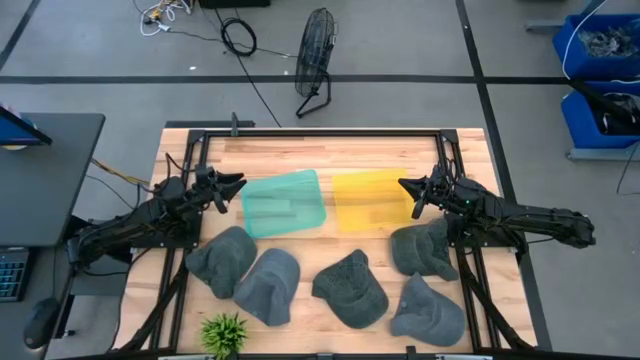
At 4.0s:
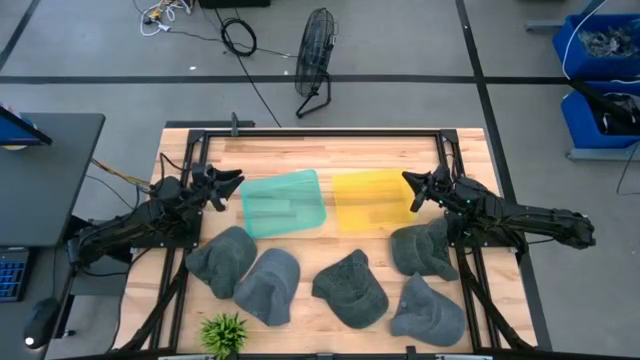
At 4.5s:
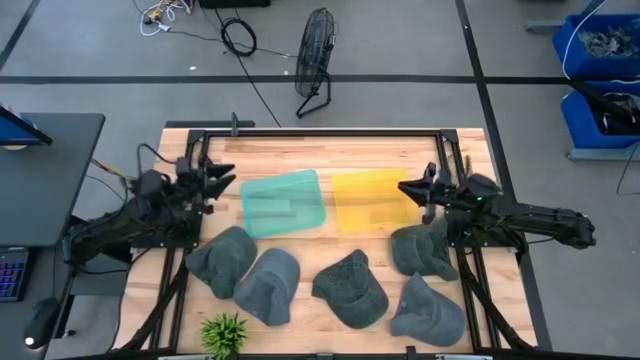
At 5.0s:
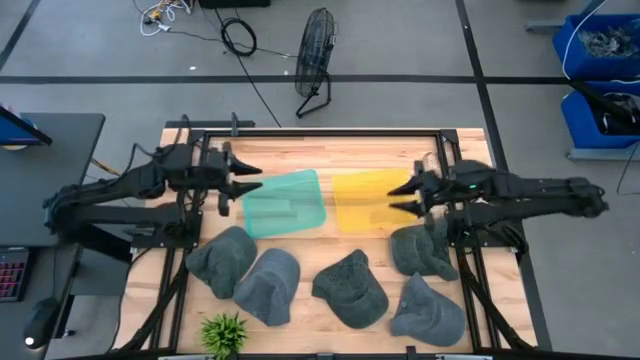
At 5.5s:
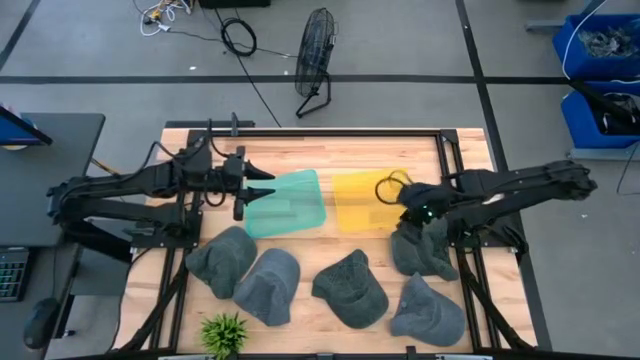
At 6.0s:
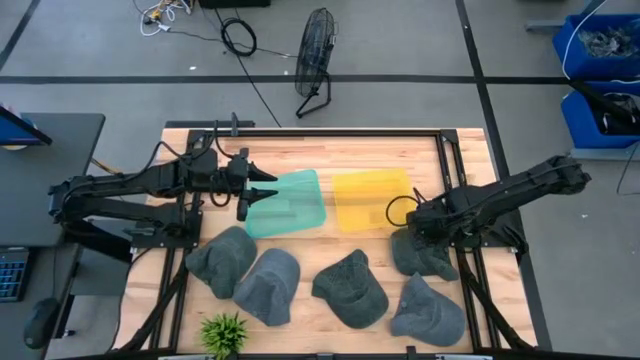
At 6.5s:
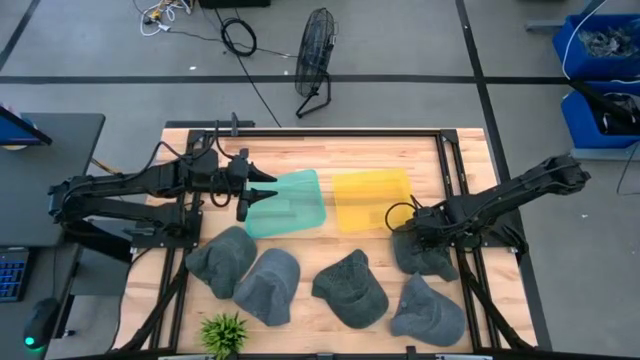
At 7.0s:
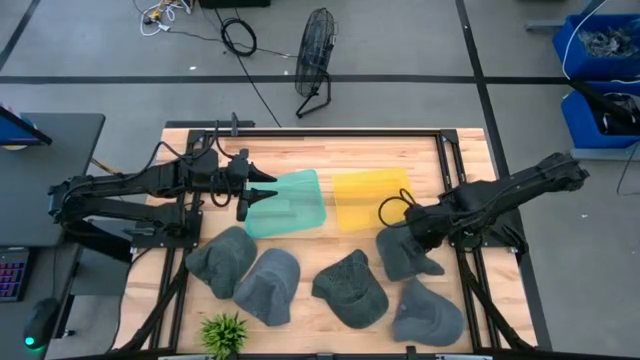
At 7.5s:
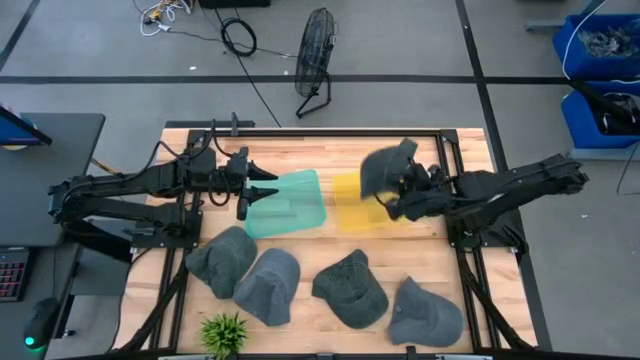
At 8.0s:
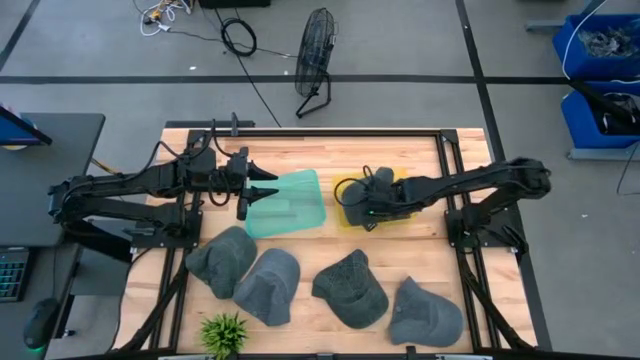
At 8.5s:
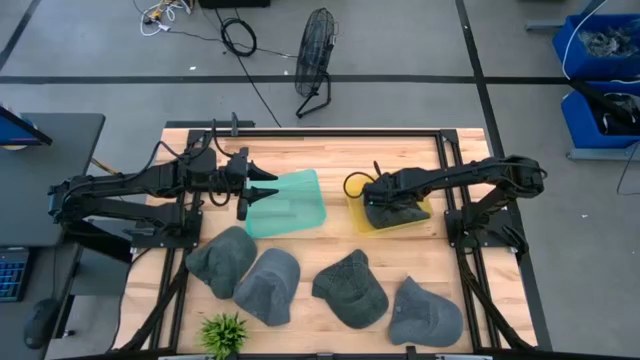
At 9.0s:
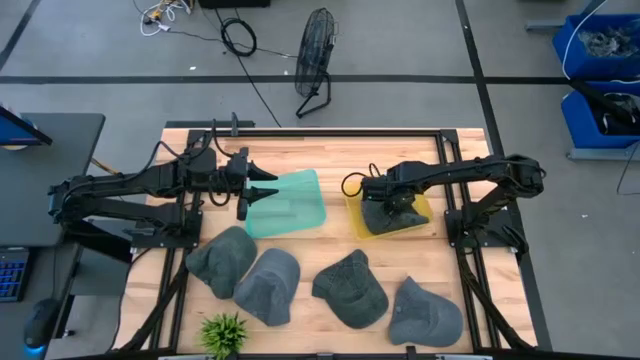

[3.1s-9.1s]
Task: Pick & Place hat
Put the right black cap into the yellow bin

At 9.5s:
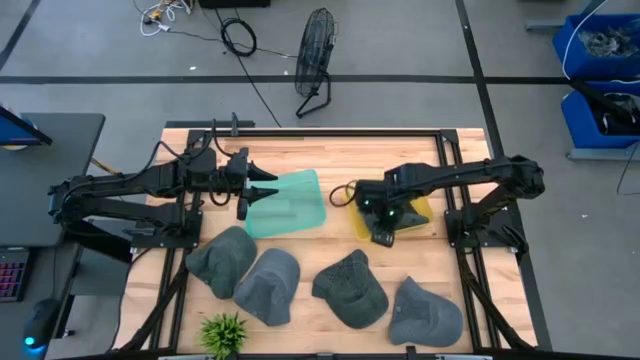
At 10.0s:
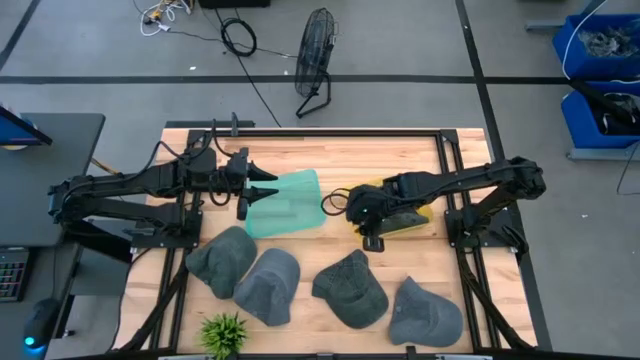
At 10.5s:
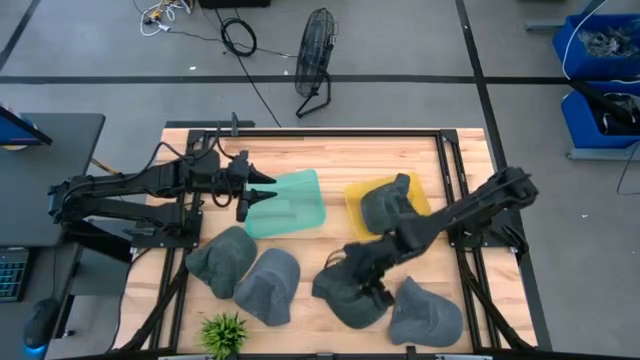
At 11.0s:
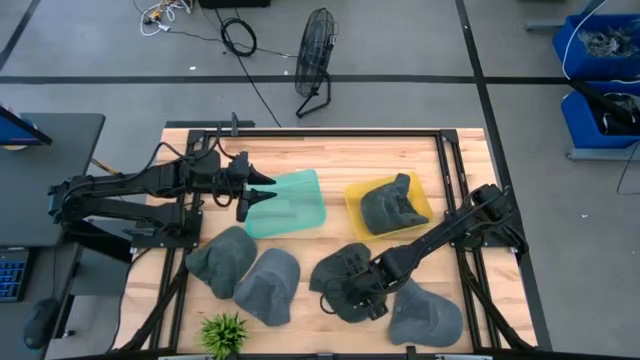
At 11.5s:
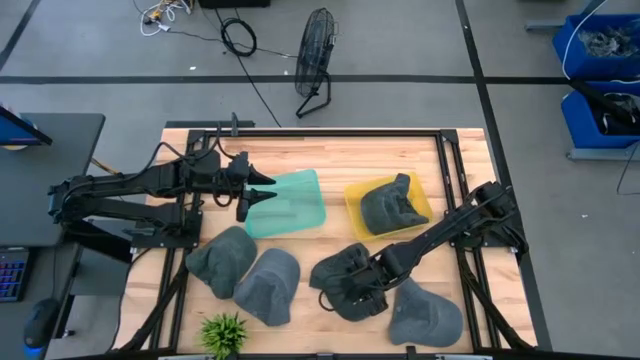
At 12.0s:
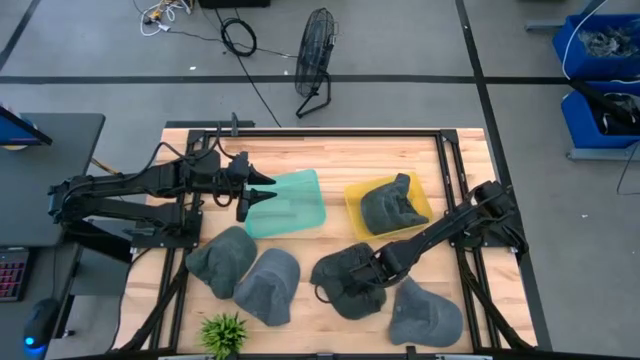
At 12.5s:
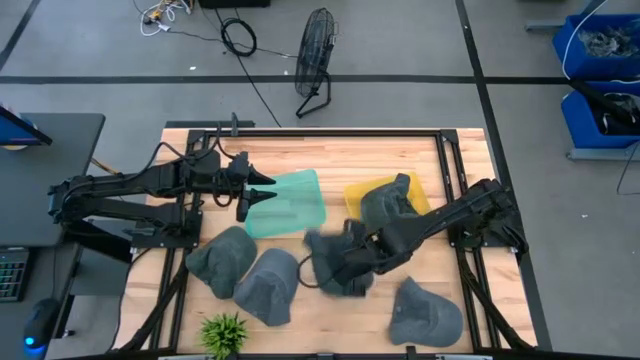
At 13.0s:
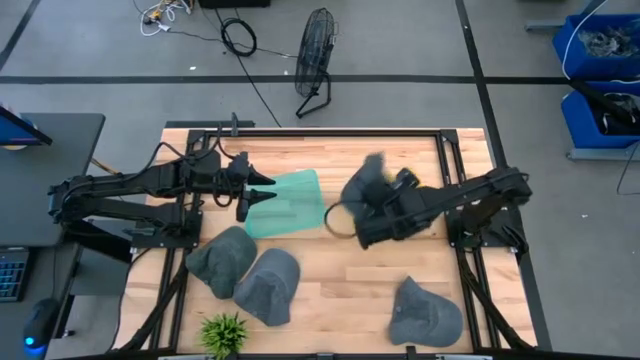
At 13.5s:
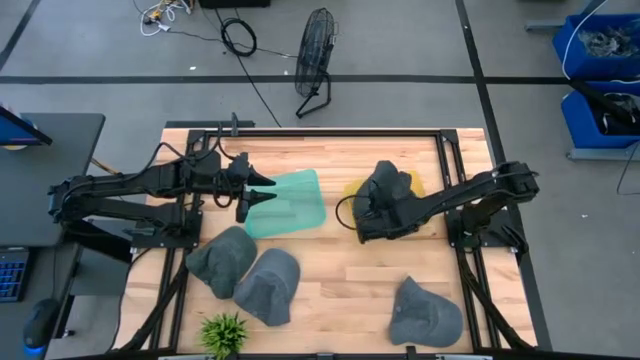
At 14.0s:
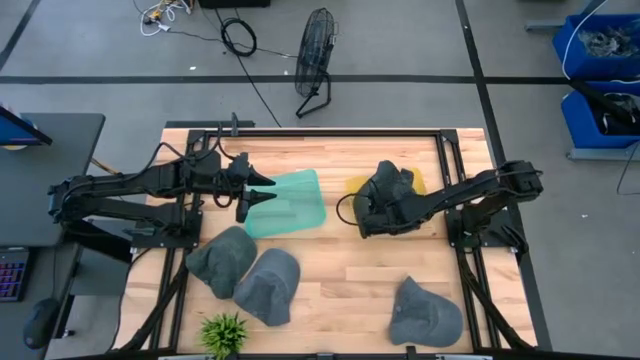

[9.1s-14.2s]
Put the right black cap into the yellow bin

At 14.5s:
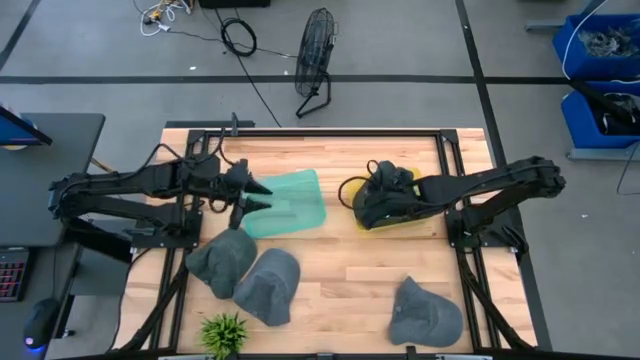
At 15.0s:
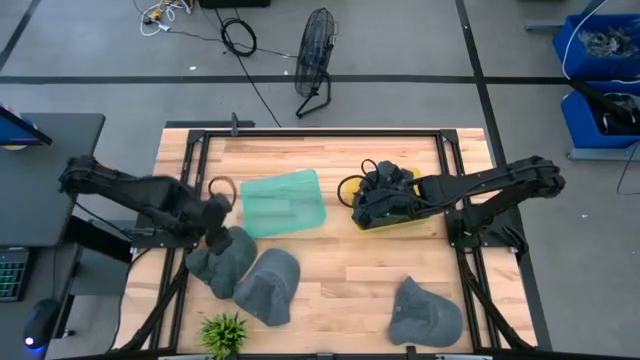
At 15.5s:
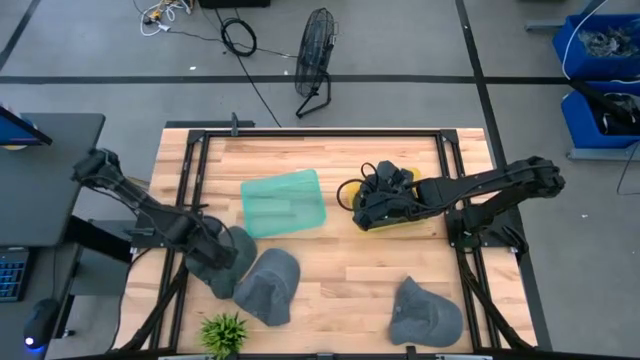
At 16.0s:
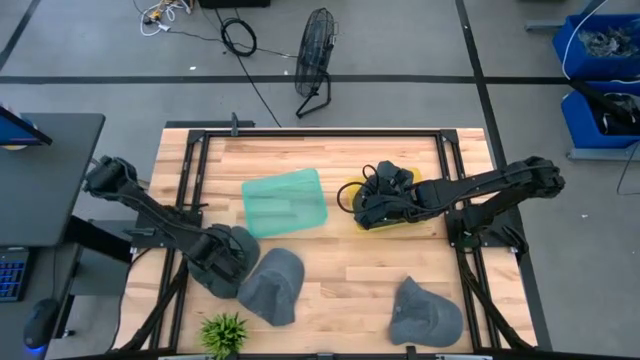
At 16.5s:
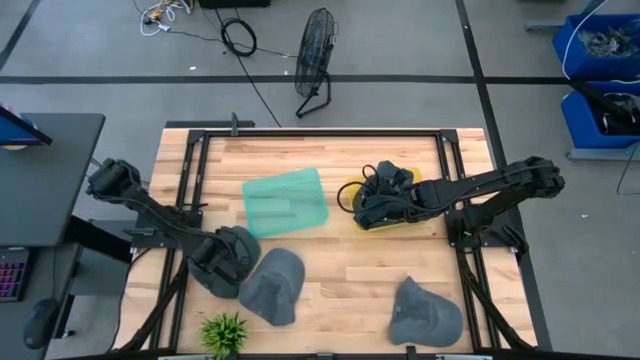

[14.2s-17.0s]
Put the black cap into the yellow bin

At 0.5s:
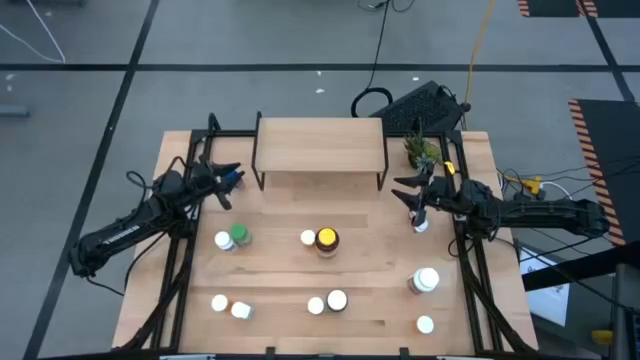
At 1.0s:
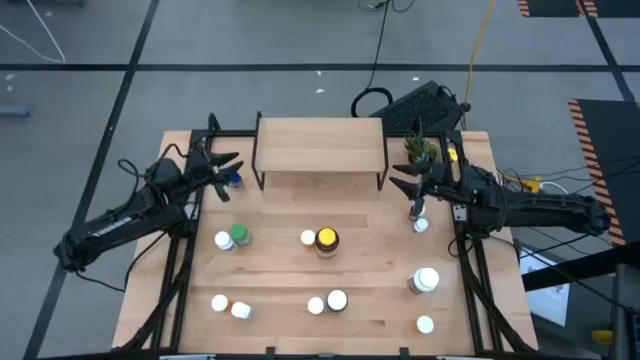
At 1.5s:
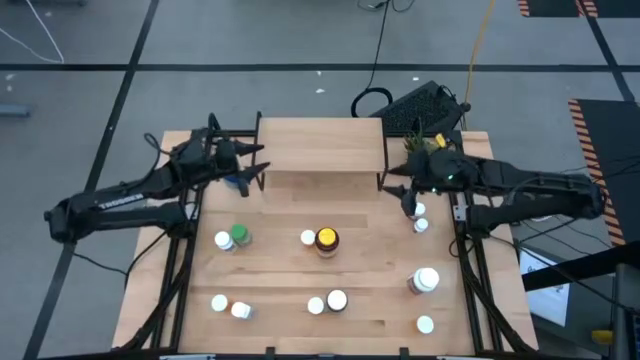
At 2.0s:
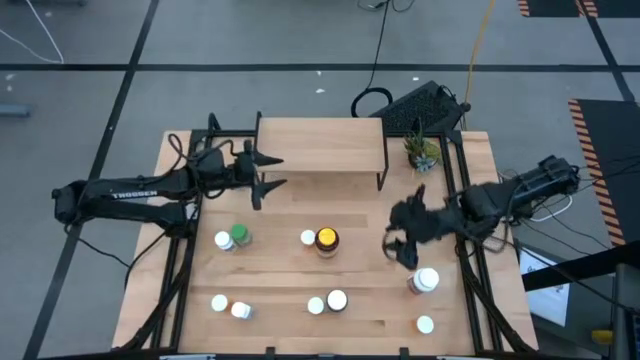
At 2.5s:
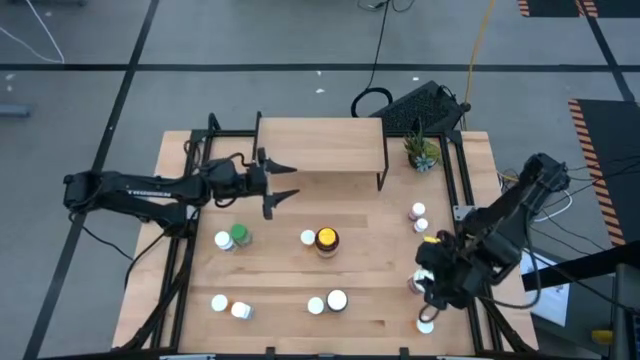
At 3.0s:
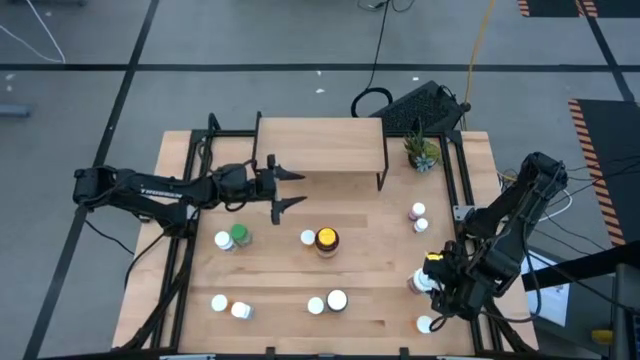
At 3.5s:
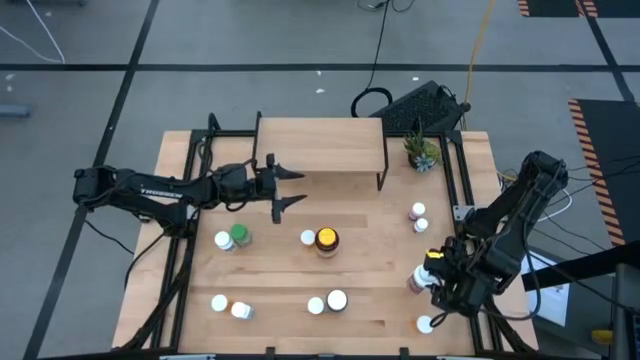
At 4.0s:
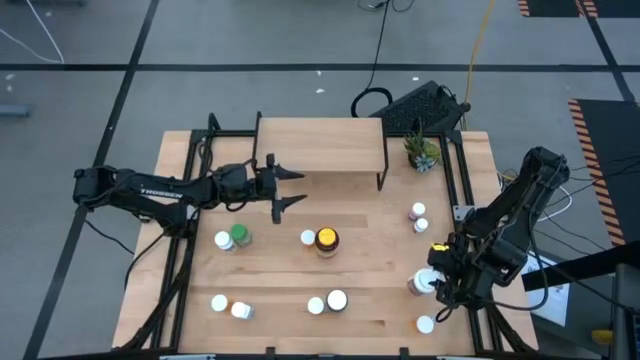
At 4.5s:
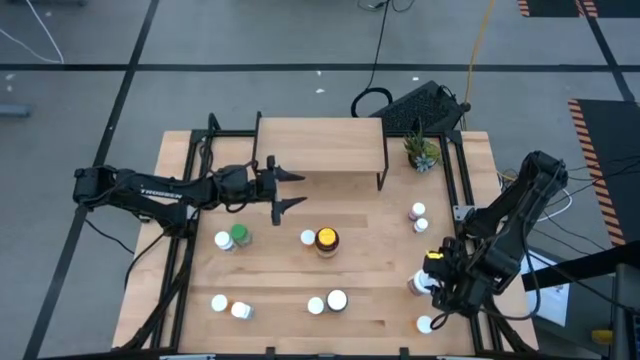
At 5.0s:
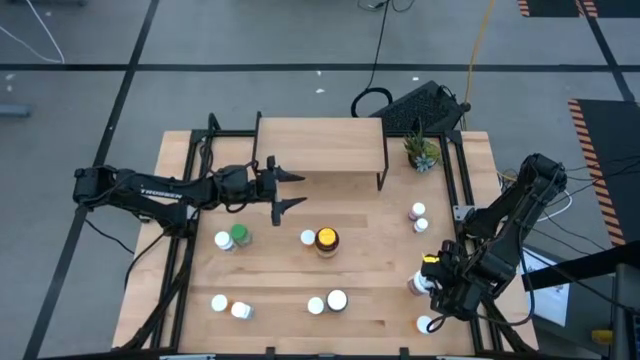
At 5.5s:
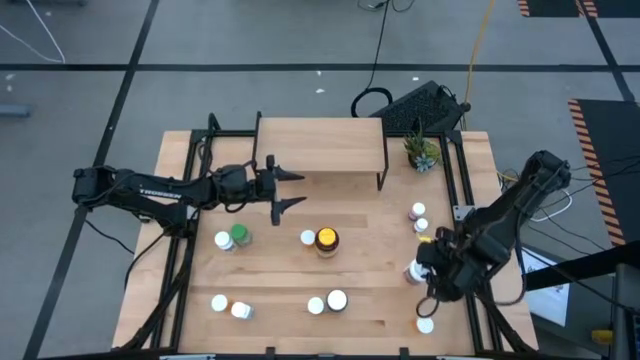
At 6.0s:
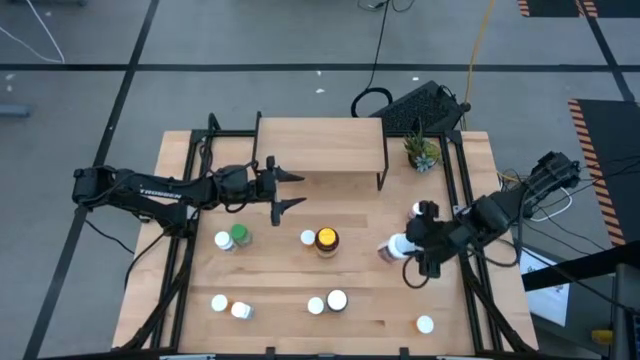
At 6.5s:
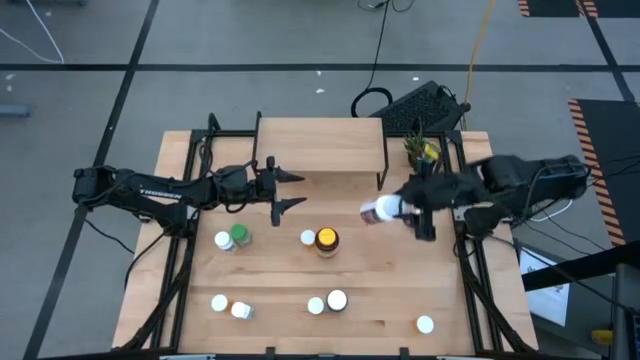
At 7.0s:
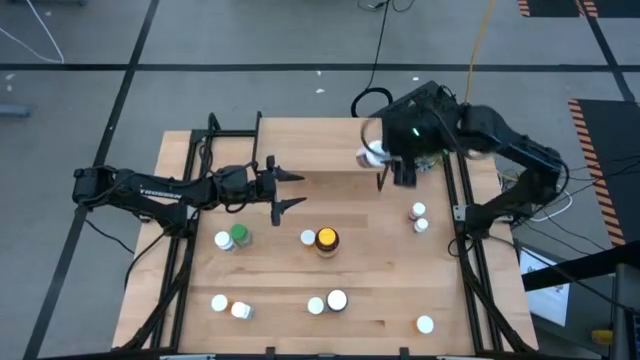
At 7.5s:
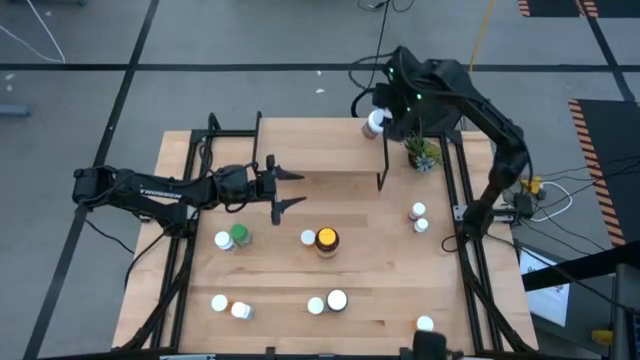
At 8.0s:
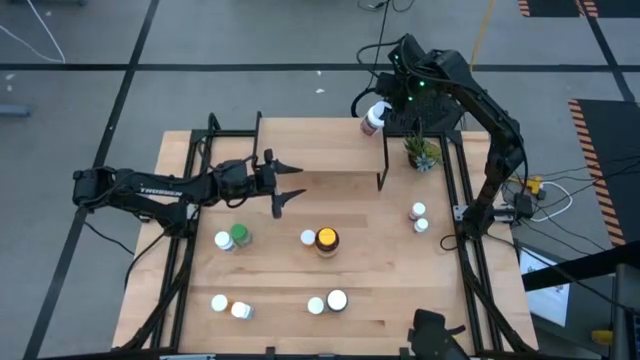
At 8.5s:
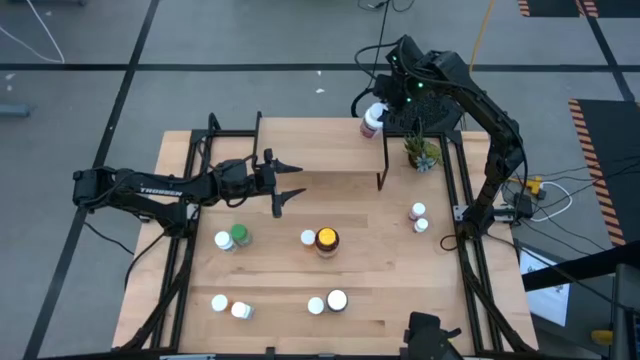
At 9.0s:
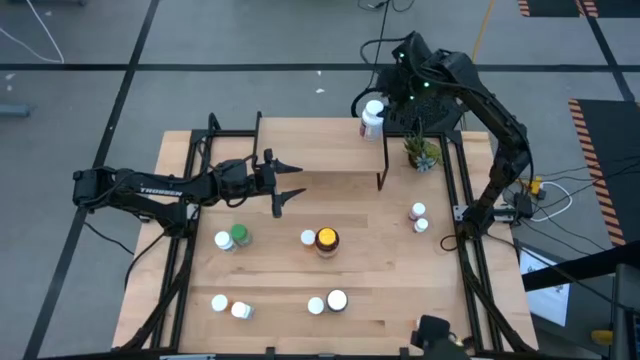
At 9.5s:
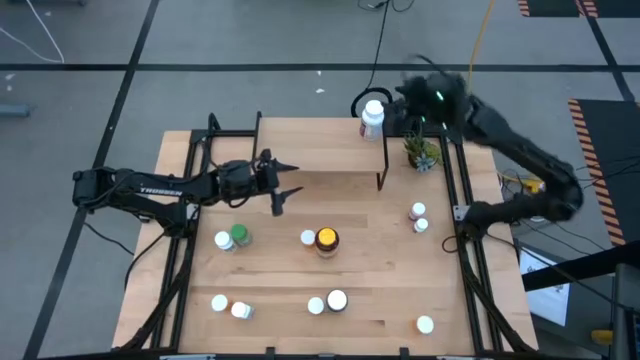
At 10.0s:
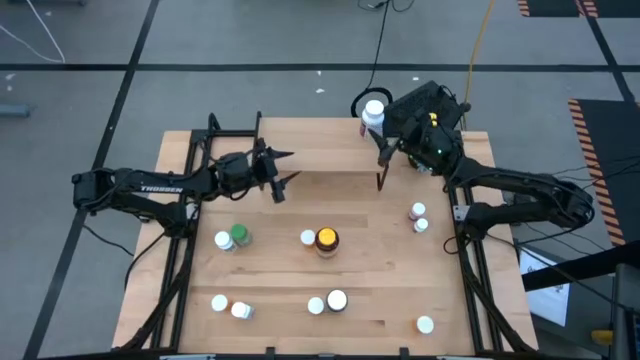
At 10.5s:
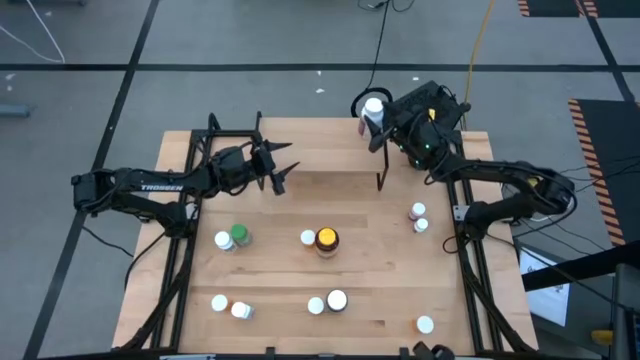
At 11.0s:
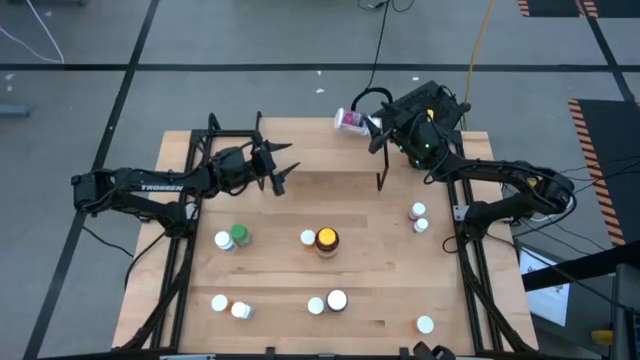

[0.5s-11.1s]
Task: Pick and place medicine bottles onto shelf by color
Put the white violet pill bottle on the shelf
